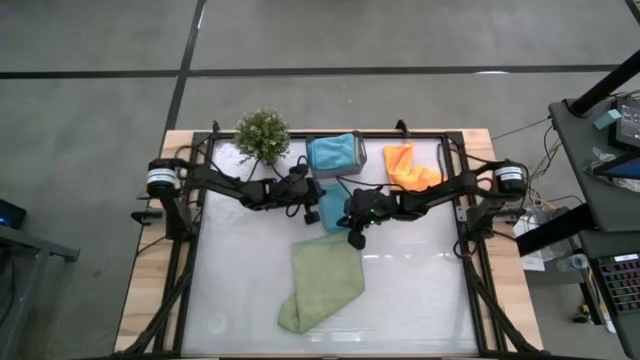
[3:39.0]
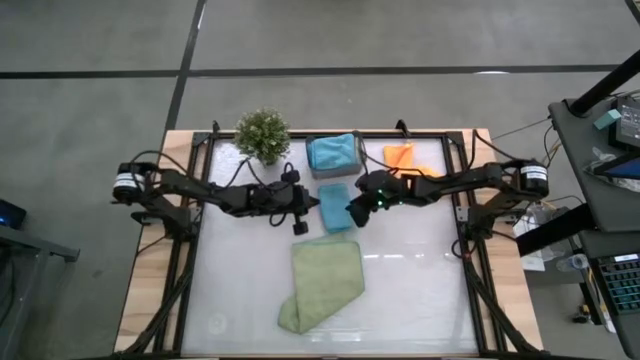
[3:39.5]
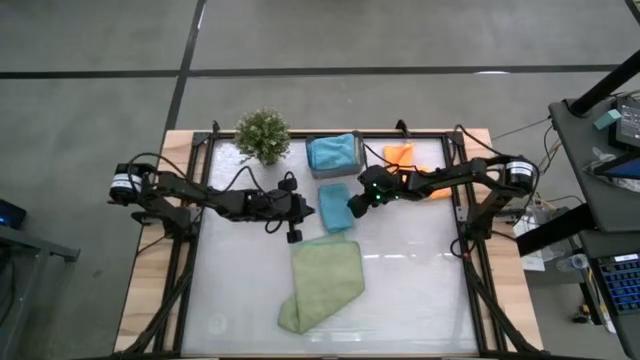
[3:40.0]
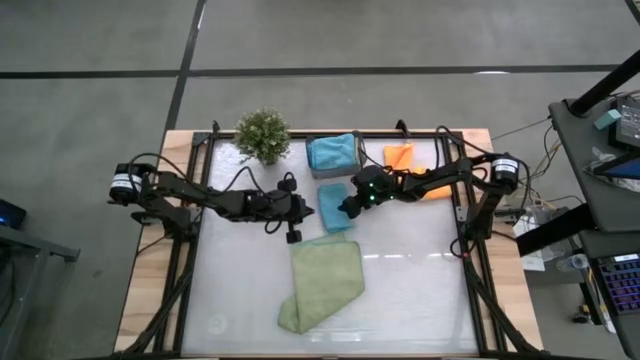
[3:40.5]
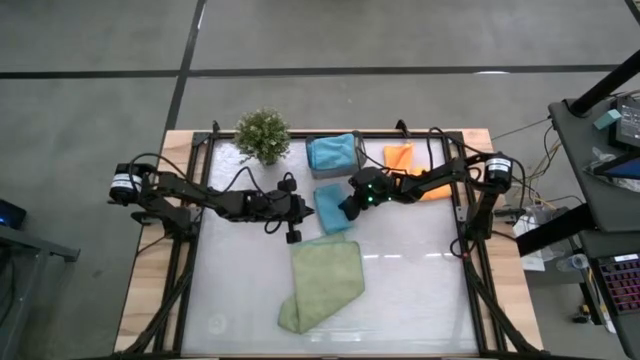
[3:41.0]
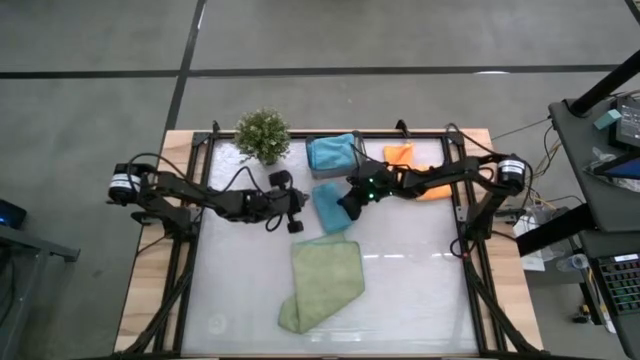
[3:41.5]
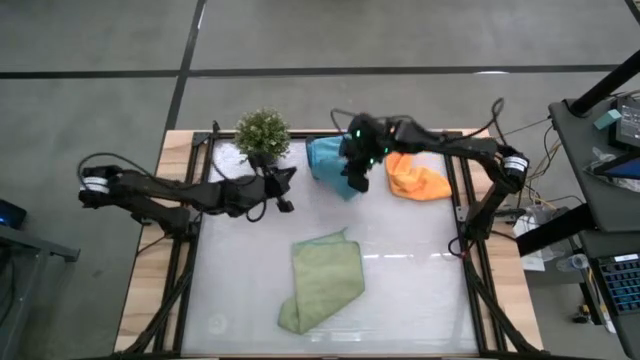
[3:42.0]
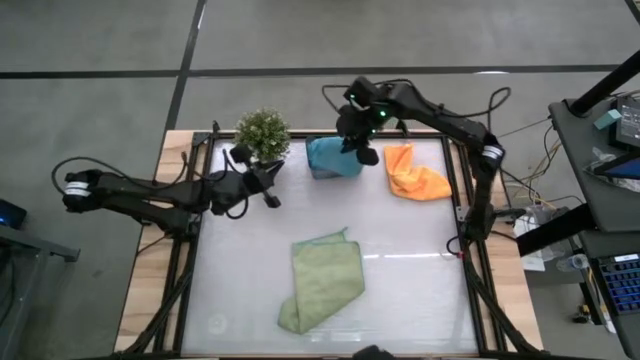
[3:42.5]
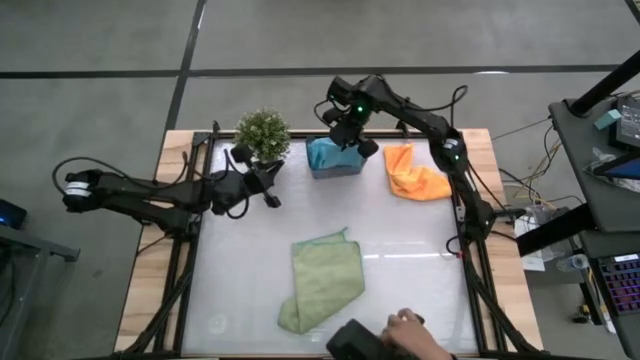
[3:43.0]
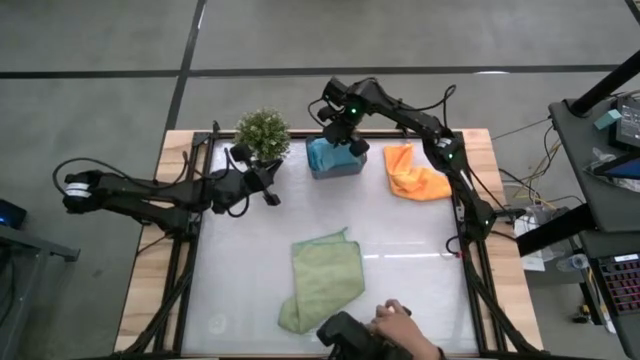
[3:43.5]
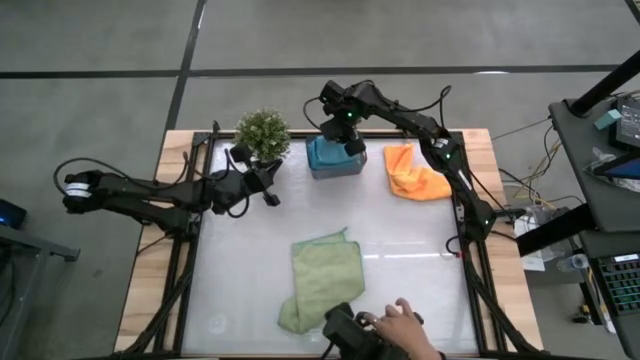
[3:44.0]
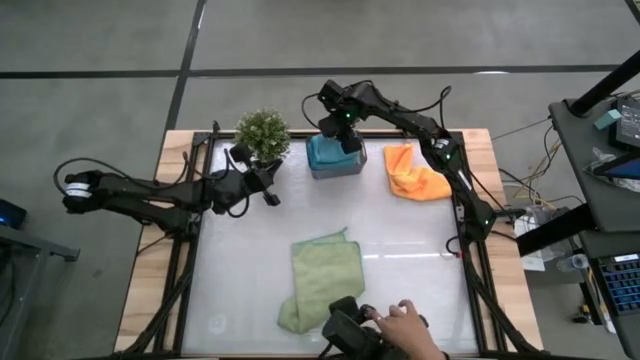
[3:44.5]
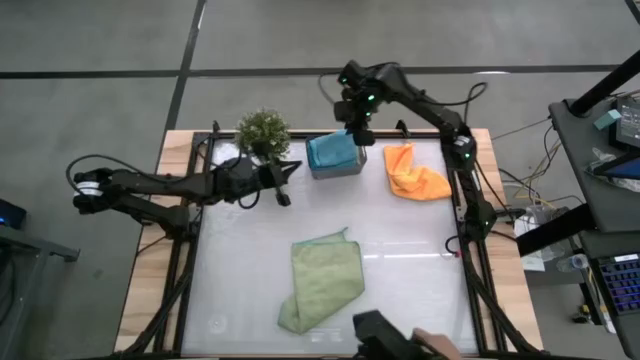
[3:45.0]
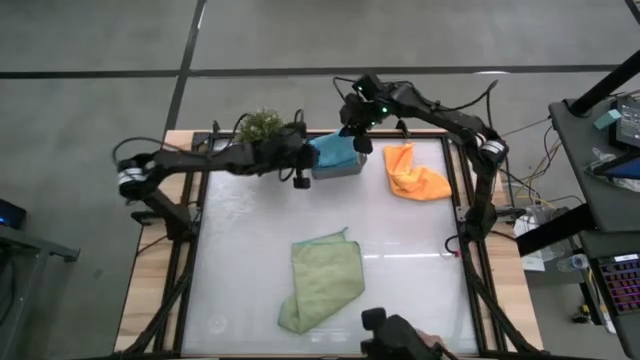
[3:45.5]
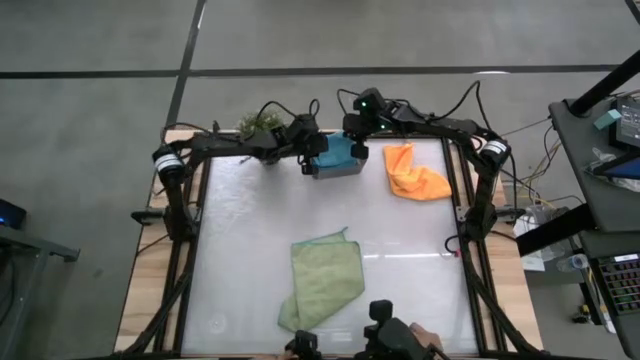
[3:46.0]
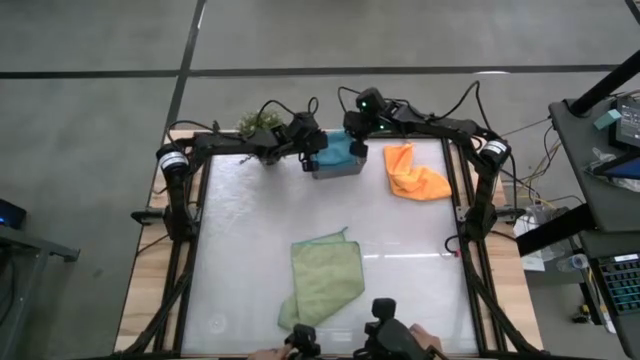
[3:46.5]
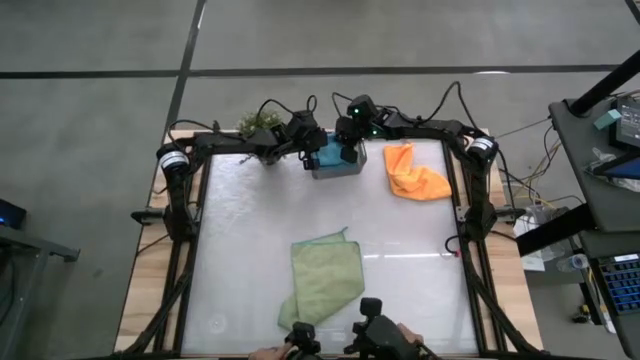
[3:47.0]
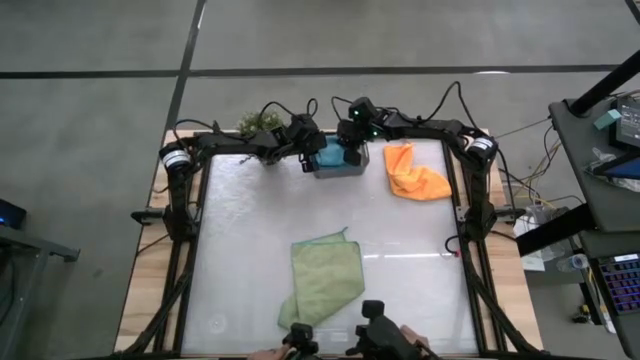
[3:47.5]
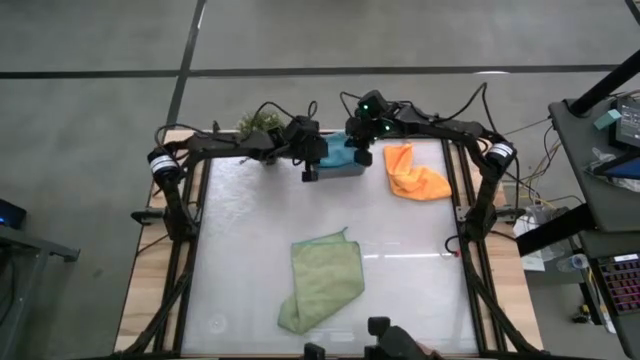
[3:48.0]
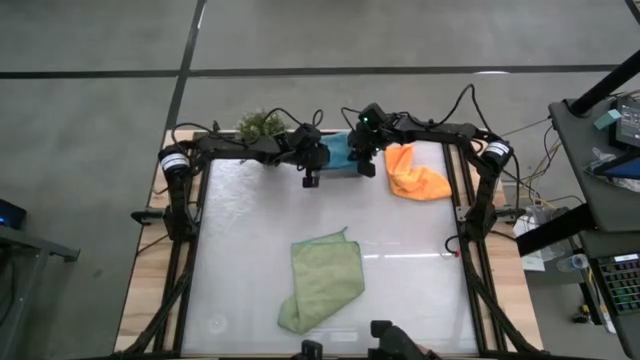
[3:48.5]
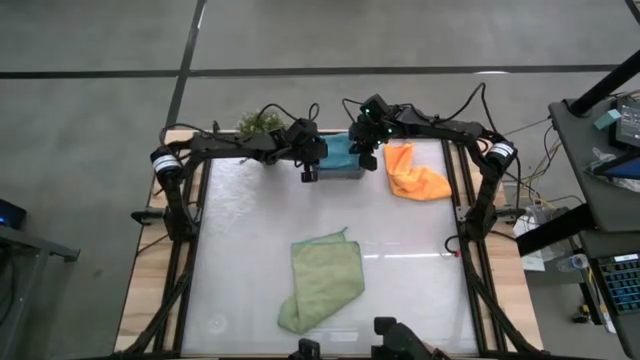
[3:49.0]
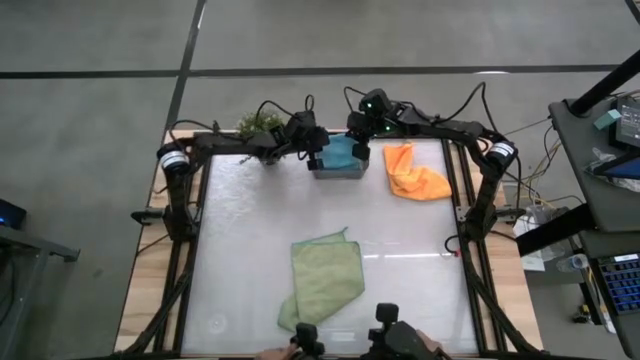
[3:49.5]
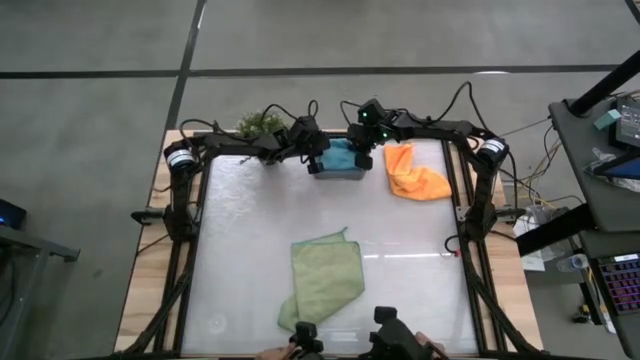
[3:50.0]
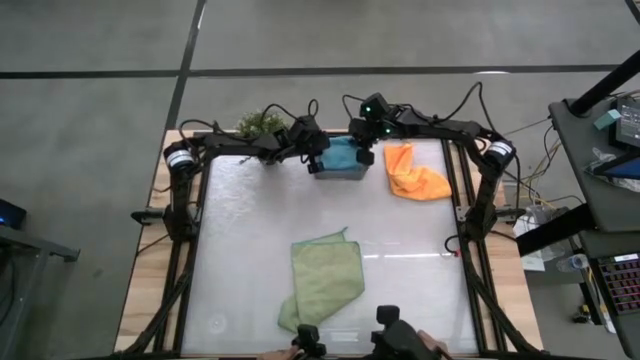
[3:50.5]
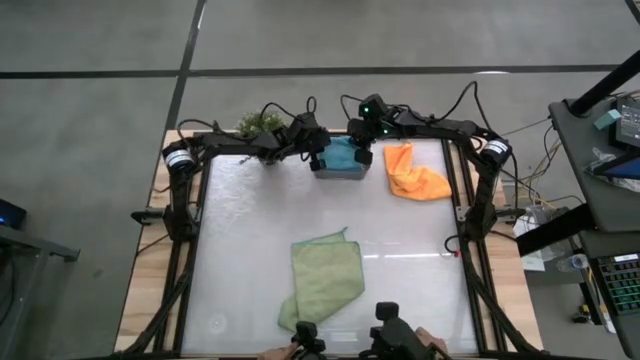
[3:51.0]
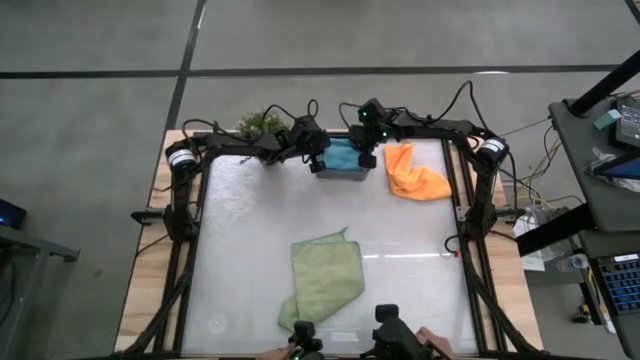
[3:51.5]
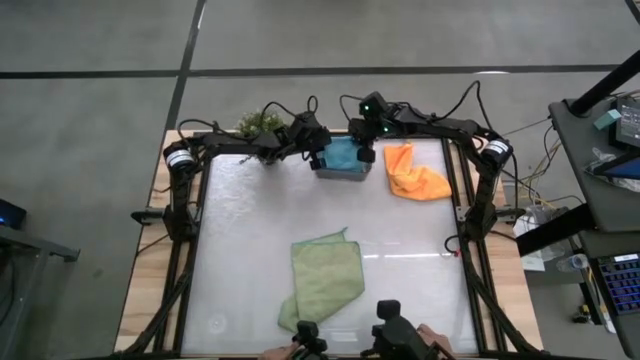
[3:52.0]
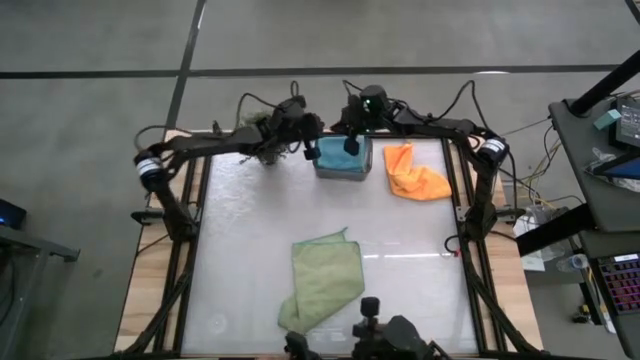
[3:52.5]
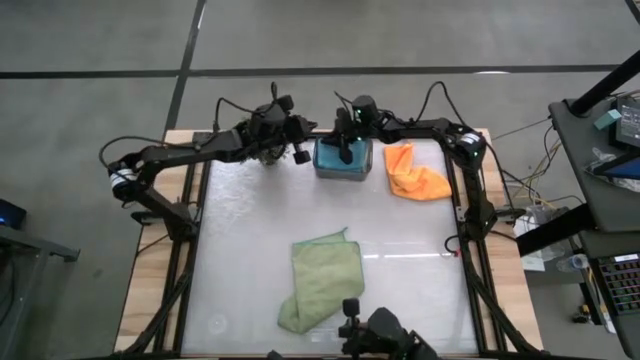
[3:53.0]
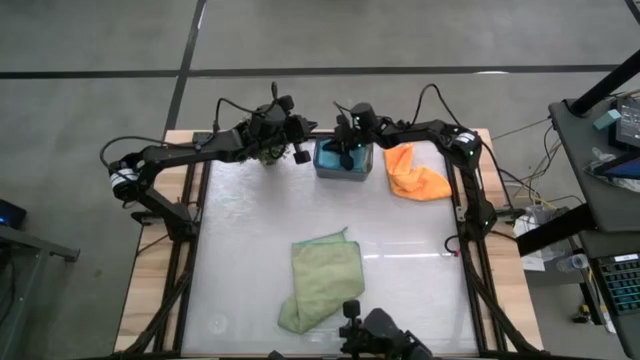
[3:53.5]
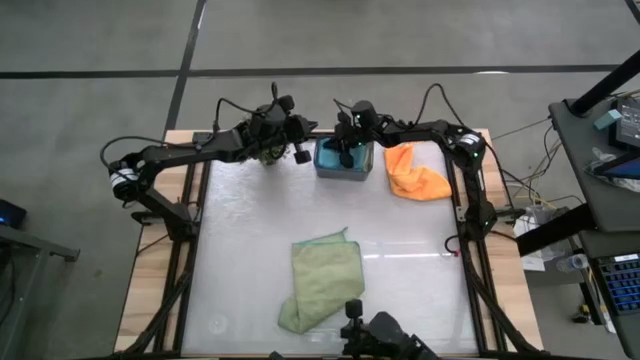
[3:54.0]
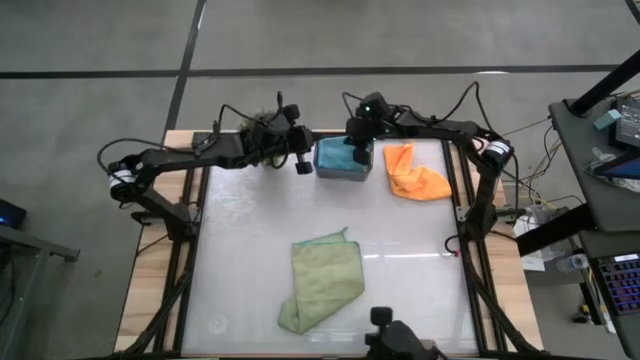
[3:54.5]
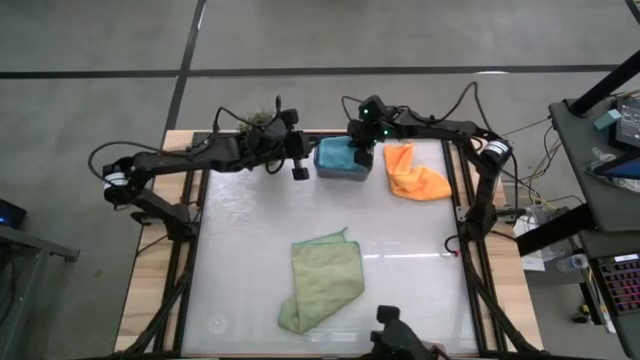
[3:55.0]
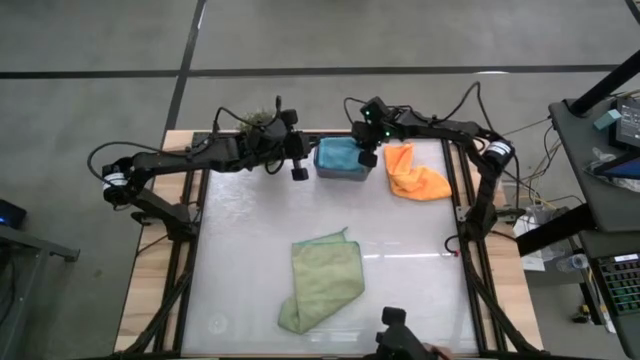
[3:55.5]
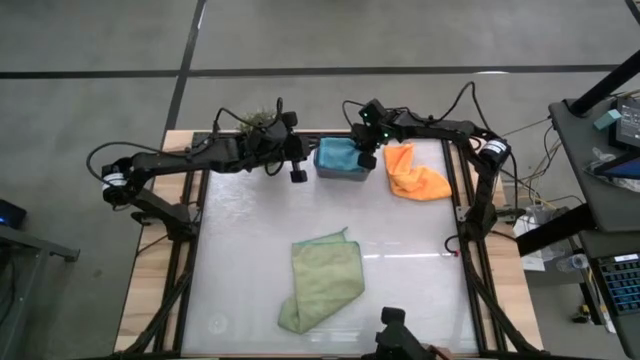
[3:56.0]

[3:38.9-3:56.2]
Task: Fold microfiber towels
Stack the folded blue towel on top of the folded blue towel into the black bin

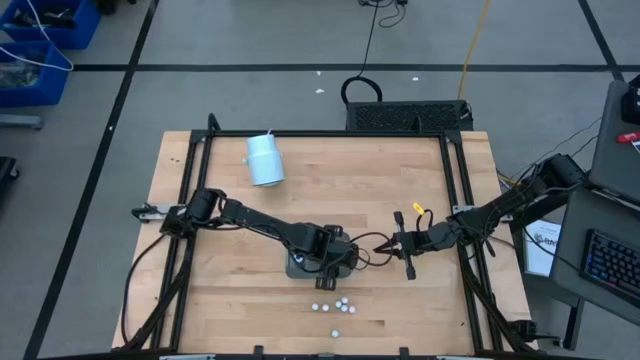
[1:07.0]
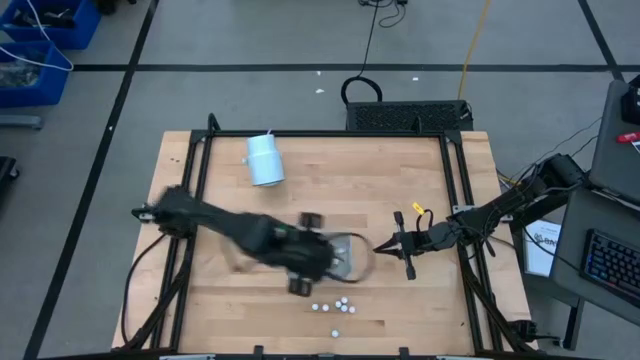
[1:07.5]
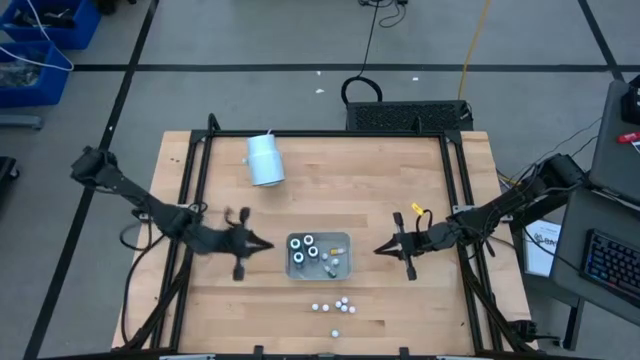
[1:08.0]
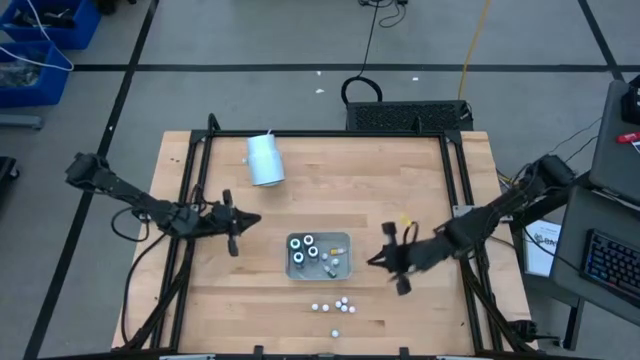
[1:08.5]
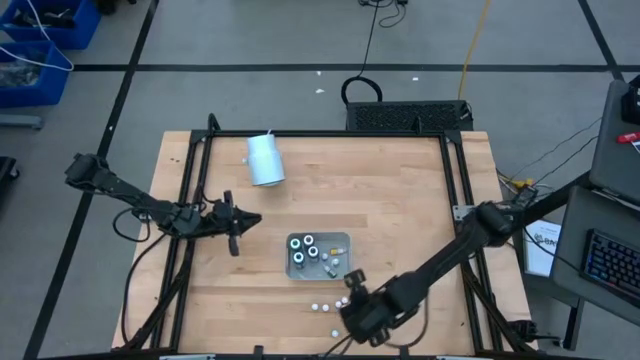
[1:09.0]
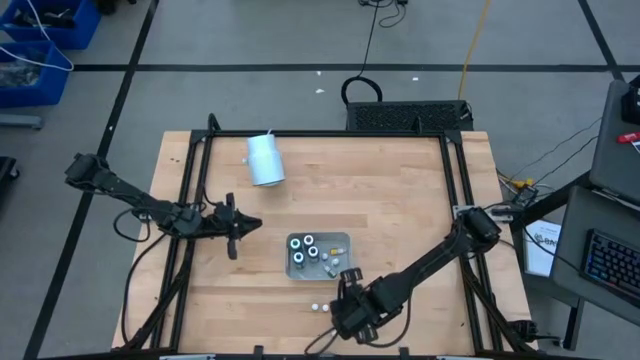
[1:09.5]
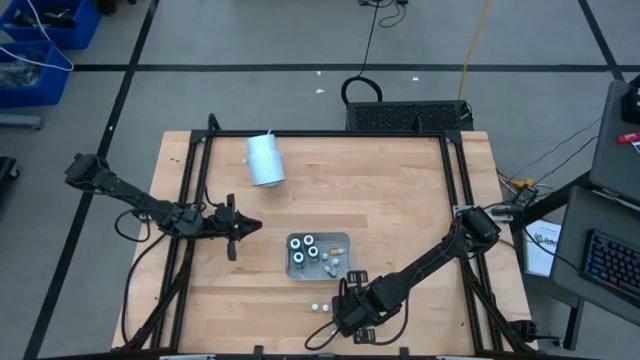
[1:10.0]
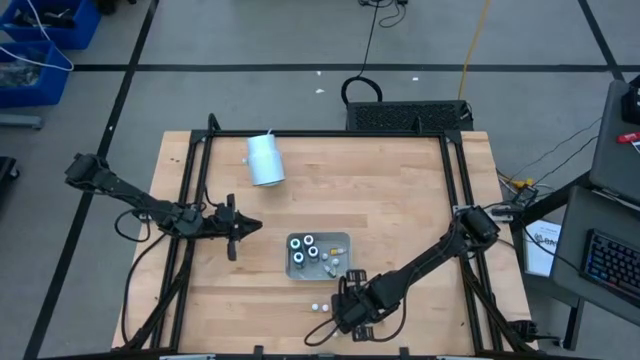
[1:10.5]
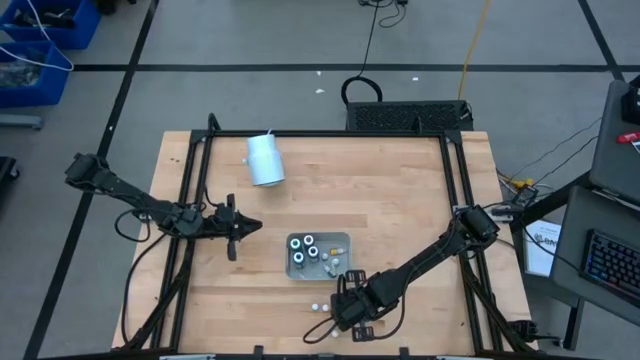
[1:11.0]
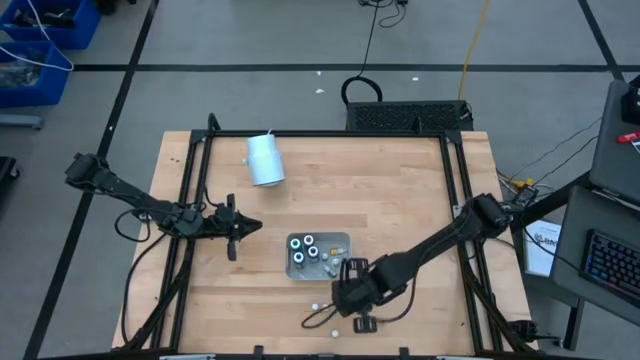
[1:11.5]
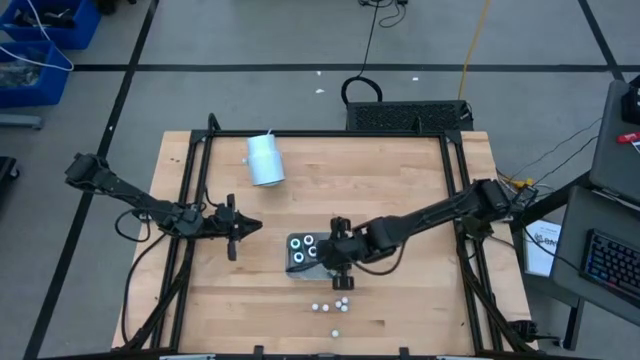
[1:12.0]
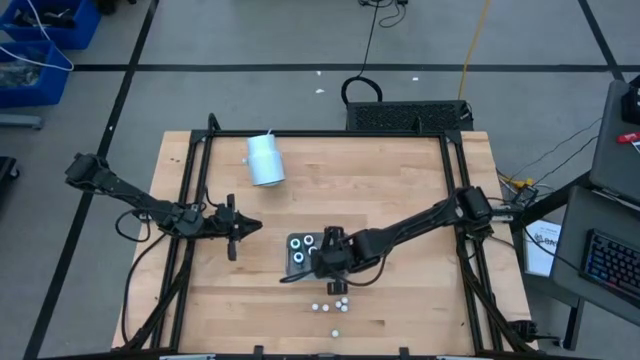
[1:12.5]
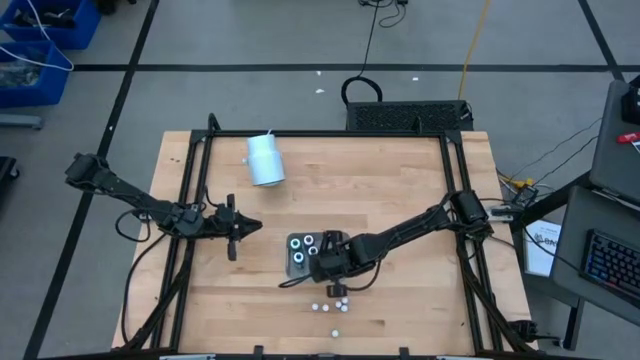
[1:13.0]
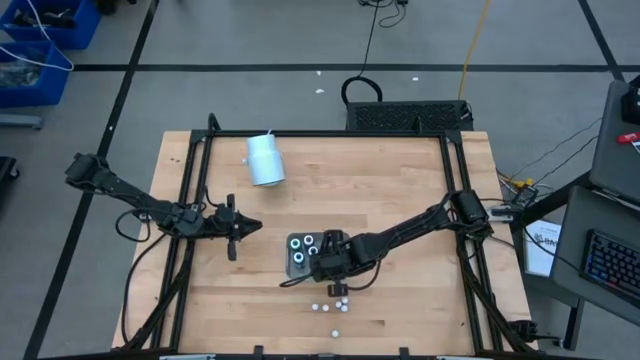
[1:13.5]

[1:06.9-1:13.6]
Task: Pick & Place food coloring
Put the small orange food coloring bottle into the gray bin
